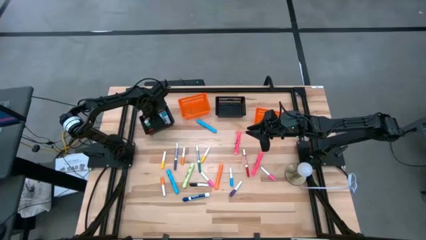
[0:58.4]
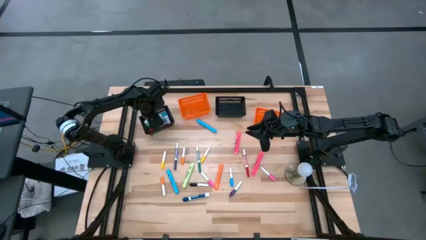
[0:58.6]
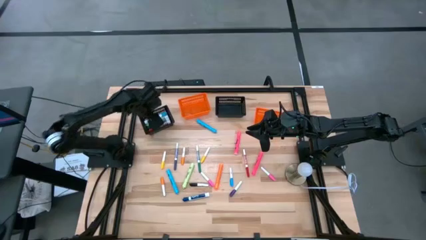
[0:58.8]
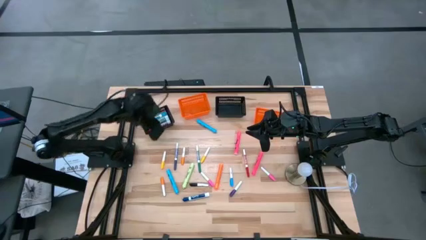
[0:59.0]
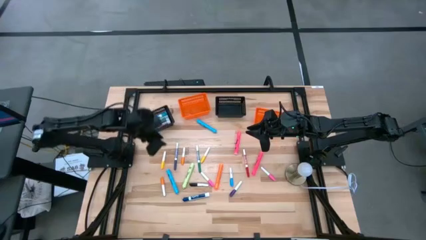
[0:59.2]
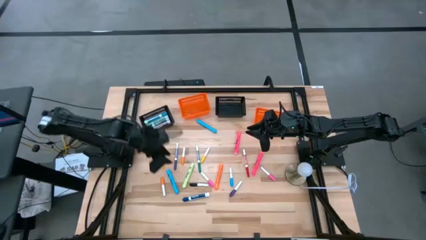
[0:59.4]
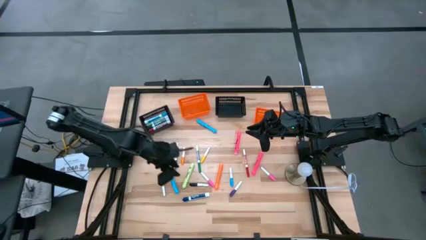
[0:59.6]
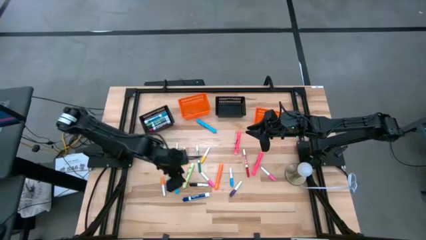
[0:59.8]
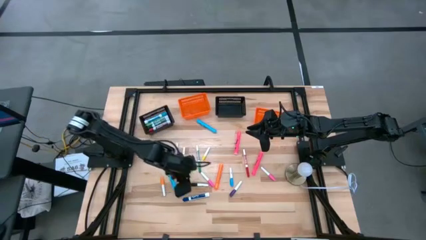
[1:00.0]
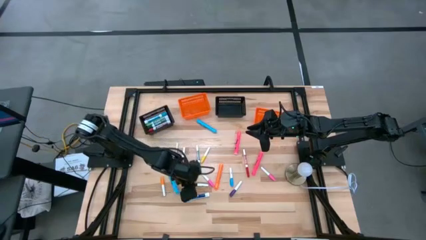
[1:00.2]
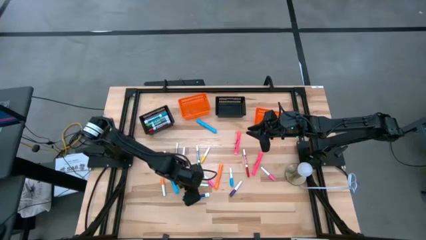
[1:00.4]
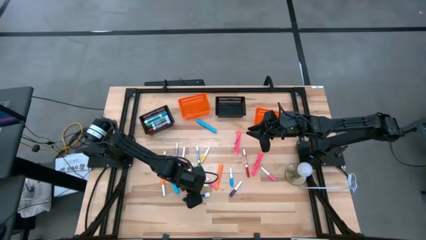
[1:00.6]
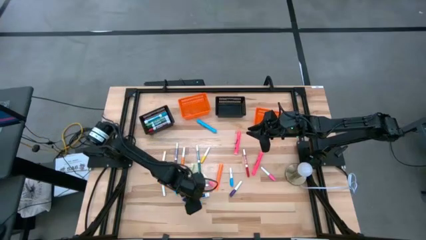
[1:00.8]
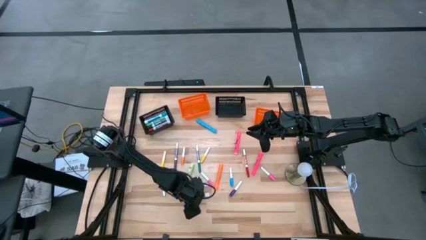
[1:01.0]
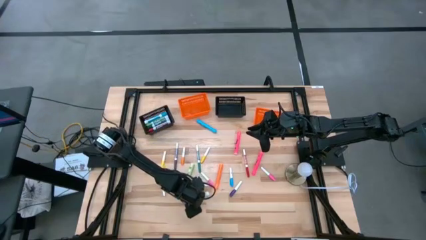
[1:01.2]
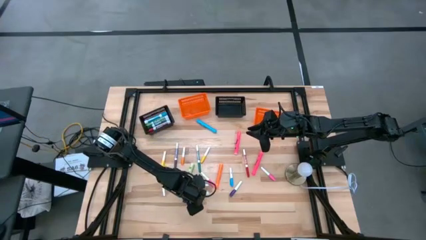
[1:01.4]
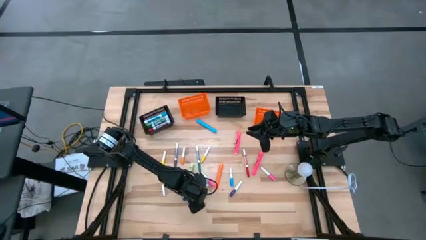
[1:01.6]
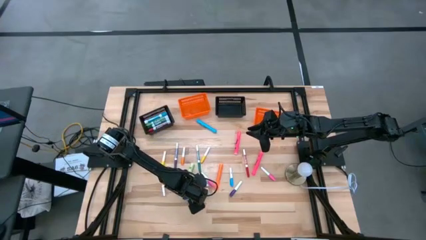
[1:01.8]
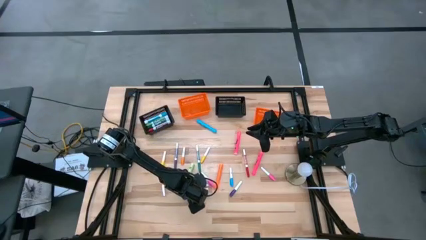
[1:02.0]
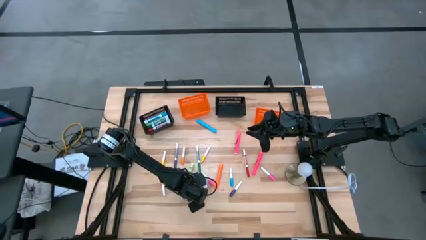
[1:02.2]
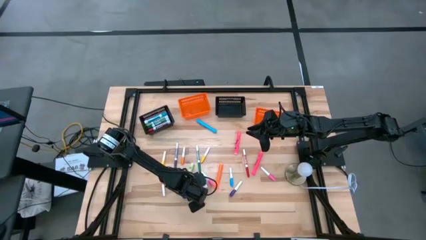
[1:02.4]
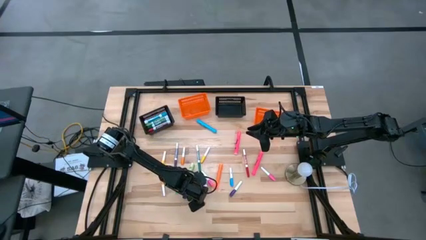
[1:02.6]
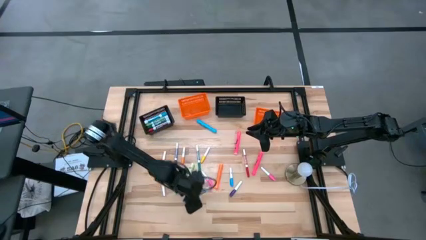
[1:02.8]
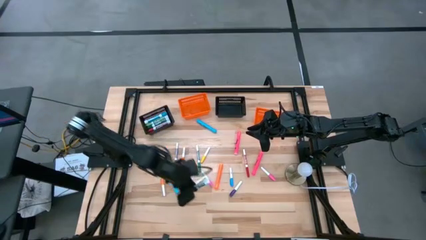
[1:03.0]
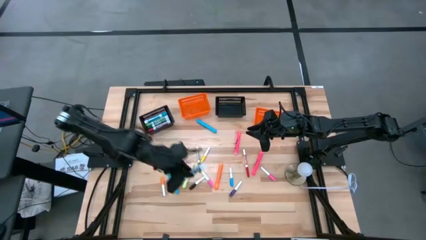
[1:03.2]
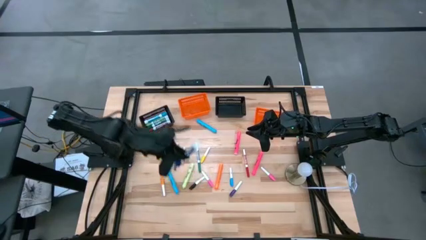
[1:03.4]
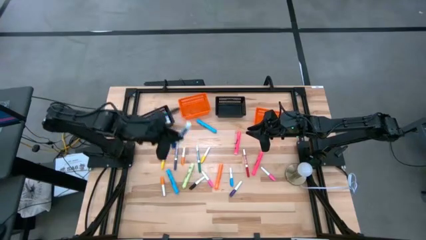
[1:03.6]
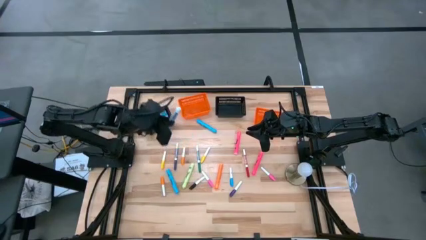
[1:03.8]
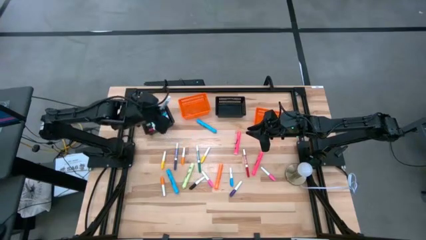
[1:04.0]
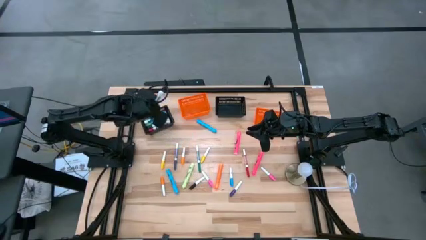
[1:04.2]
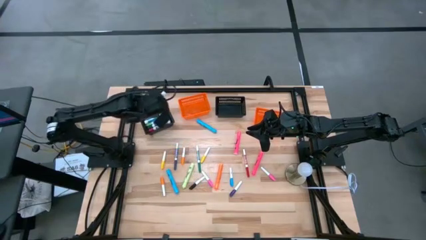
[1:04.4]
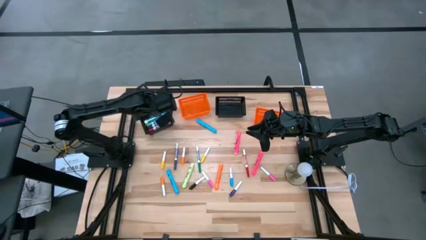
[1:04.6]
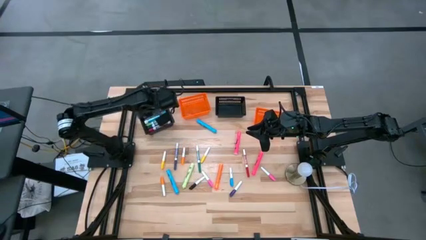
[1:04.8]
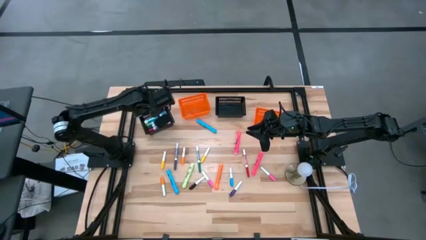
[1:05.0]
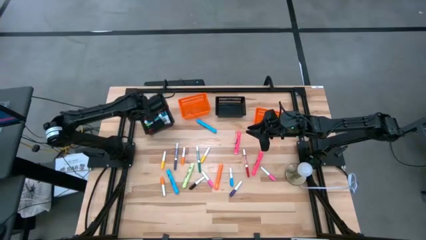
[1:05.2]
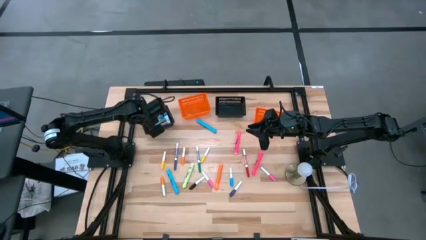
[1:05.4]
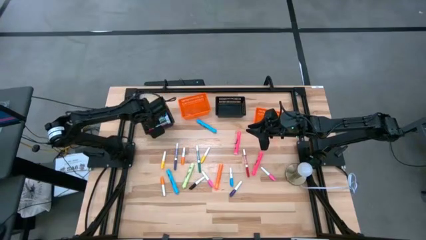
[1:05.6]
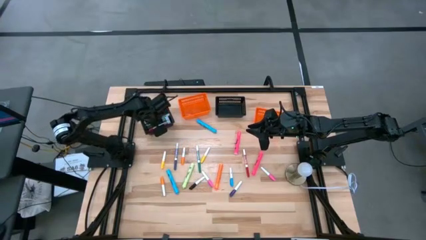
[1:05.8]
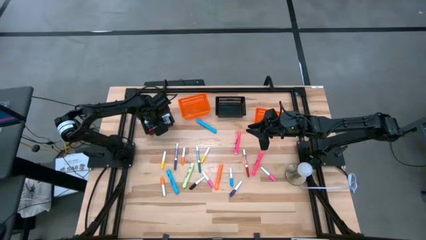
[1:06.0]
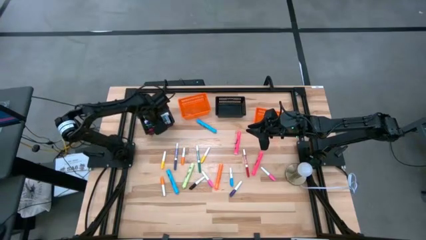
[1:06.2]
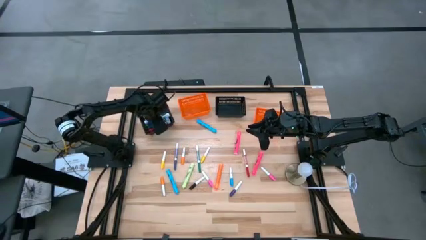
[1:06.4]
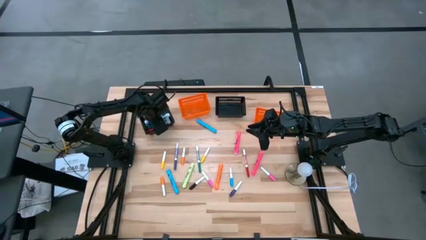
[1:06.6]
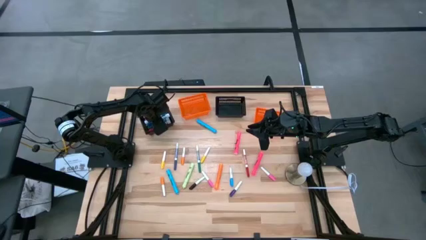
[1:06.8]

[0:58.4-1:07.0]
Task: Pick & Place Markers
Put the large blue marker pen into the left black bin

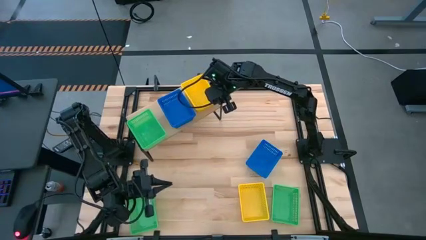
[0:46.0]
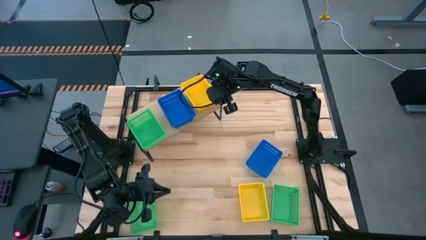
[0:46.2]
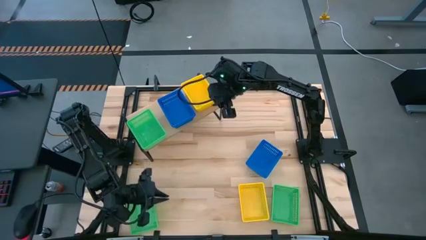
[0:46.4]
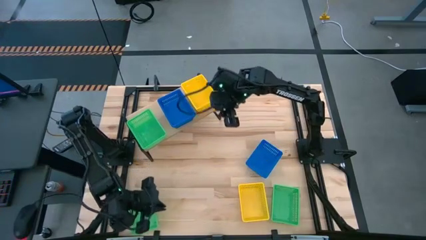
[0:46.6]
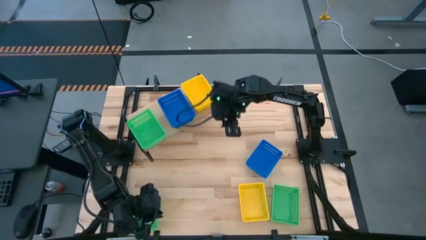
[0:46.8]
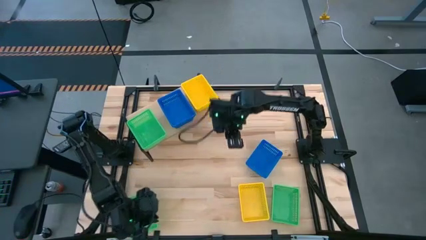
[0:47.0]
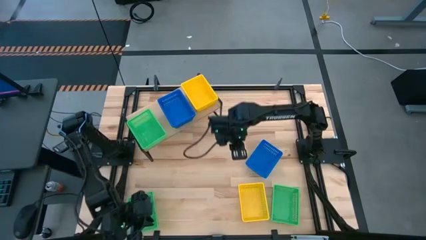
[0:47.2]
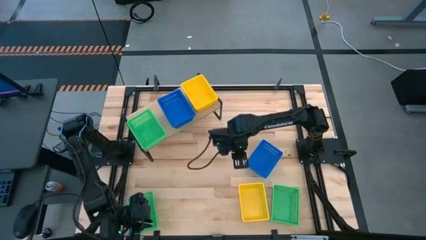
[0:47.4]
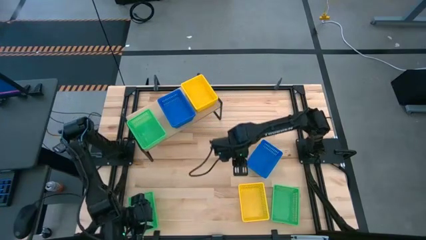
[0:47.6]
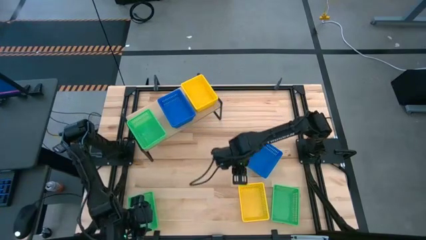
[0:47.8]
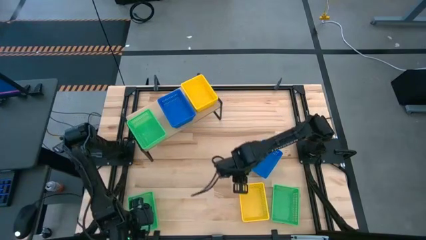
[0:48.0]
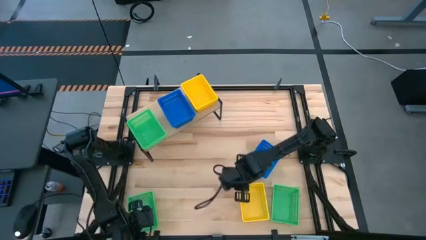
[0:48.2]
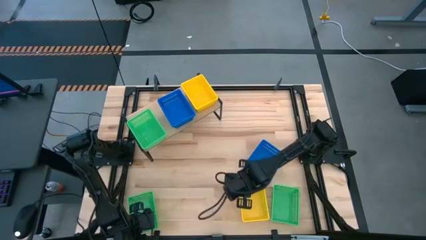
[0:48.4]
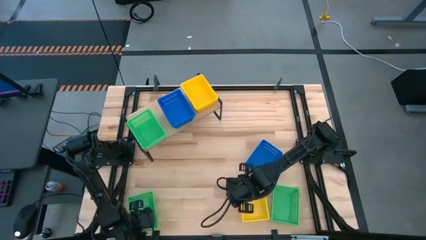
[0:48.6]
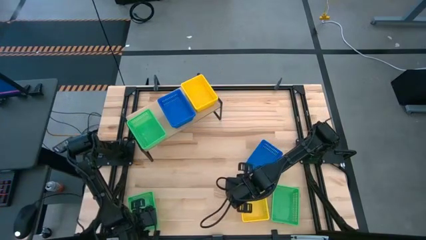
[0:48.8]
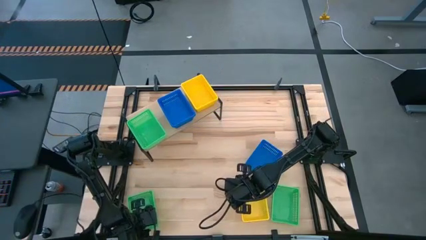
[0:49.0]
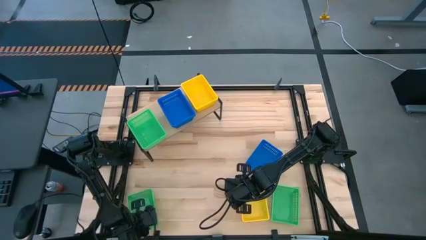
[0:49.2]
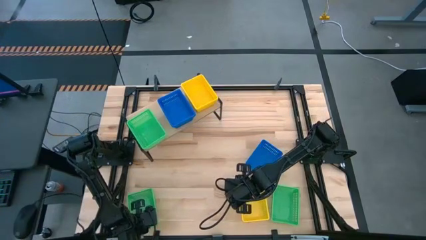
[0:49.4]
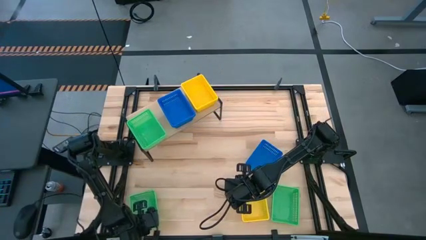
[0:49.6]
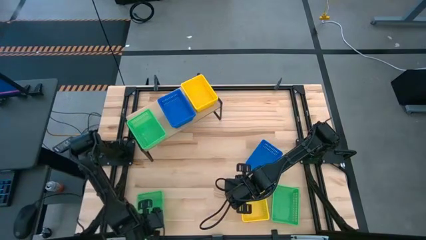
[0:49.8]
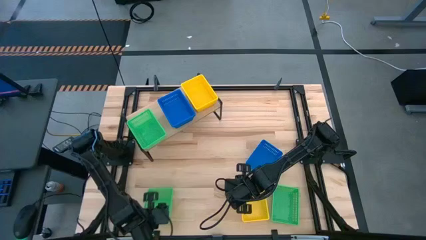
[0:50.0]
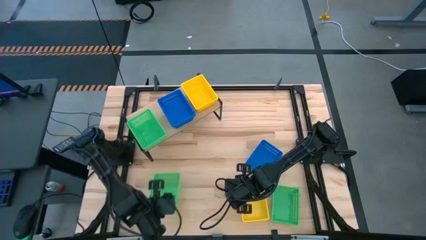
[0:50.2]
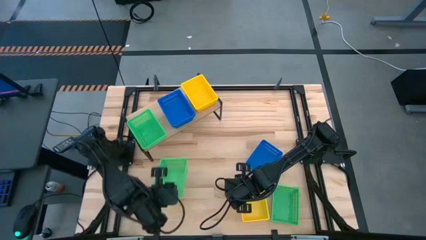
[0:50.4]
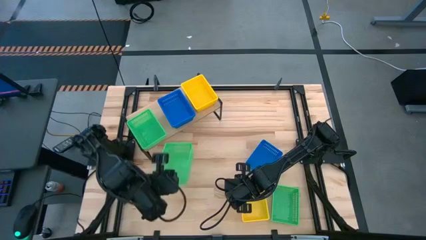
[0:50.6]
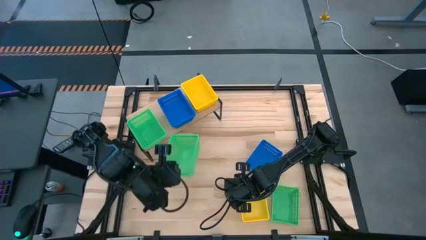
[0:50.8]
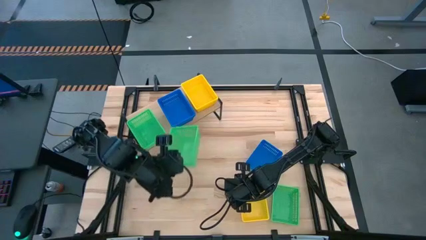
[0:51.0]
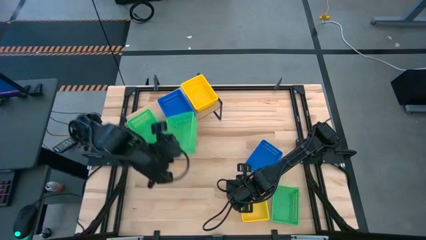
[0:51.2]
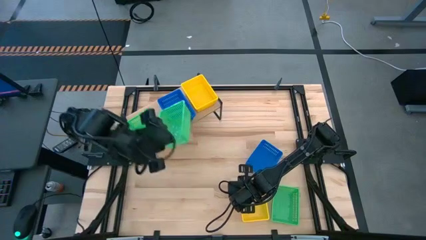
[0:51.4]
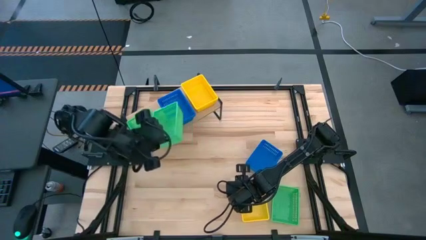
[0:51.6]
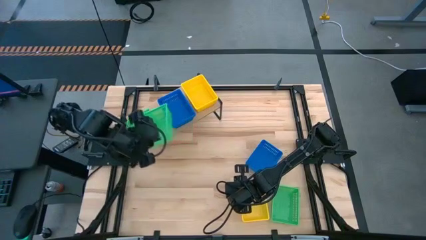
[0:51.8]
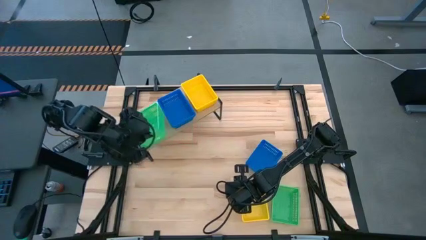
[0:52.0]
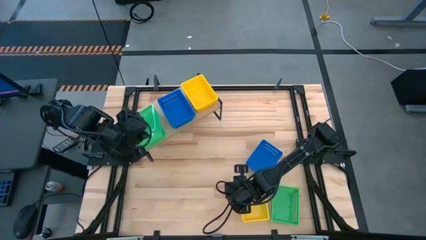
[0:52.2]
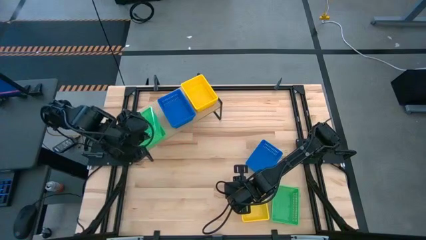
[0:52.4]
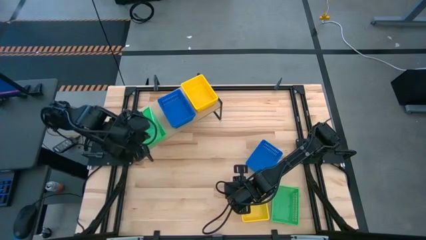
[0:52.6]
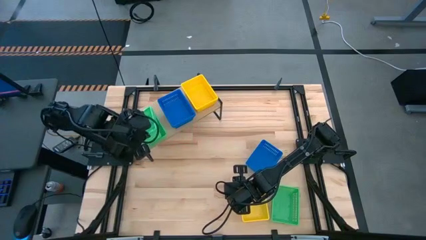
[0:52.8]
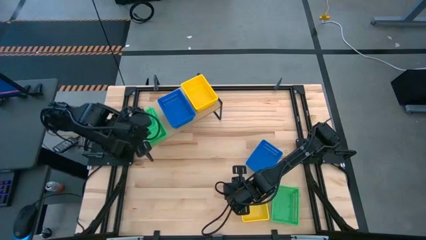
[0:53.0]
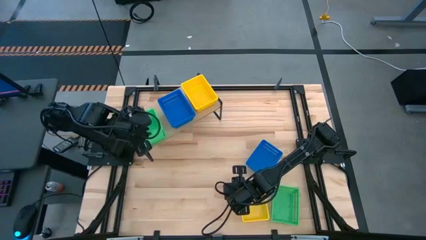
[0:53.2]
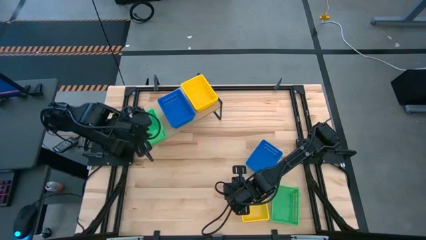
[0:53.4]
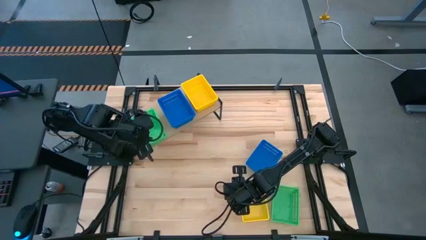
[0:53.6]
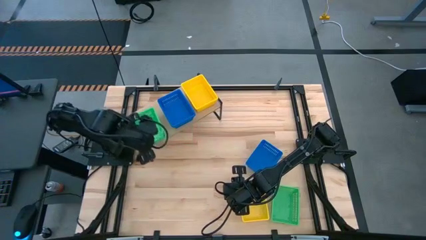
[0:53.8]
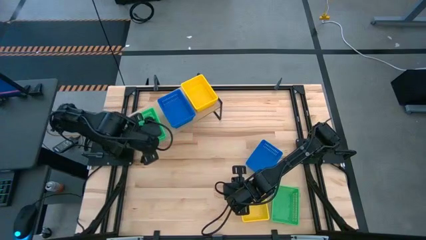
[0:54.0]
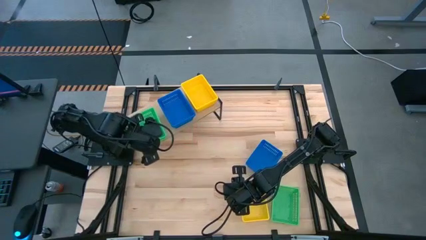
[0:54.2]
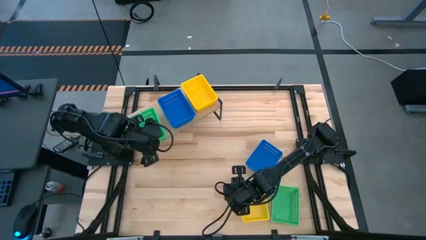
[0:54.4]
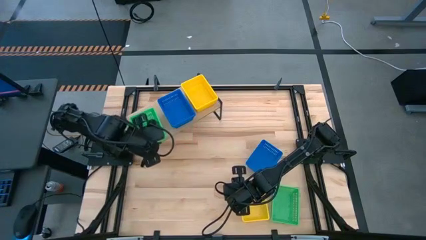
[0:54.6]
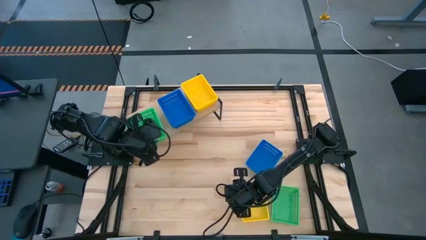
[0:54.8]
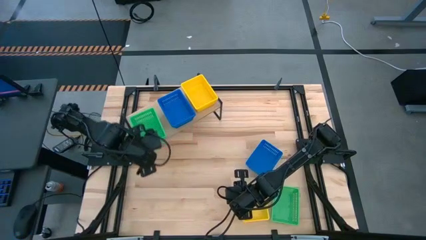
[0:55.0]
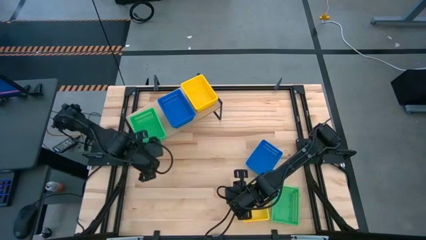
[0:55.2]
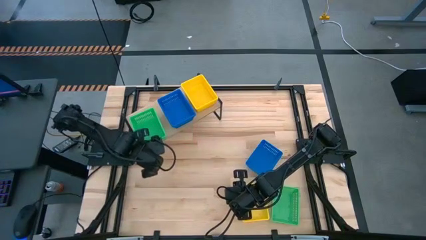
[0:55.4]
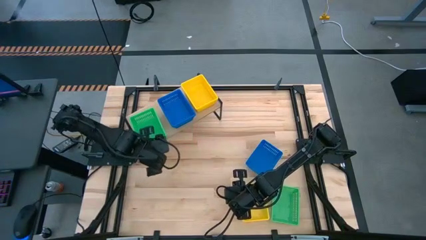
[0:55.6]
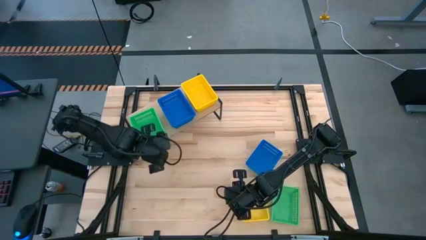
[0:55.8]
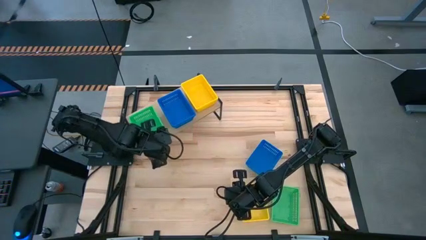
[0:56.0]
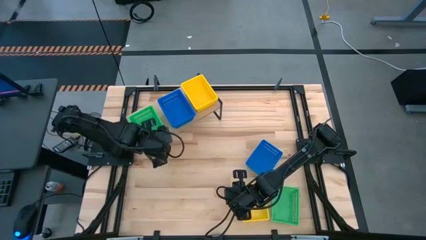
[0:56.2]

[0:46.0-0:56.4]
Task: Stack baskets on shelf by color
Stack the left green basket on top of the green basket on the shelf
